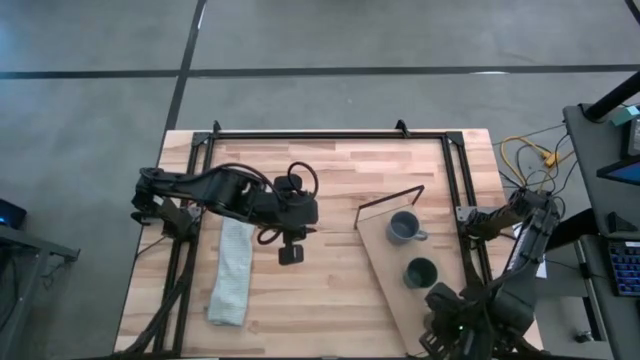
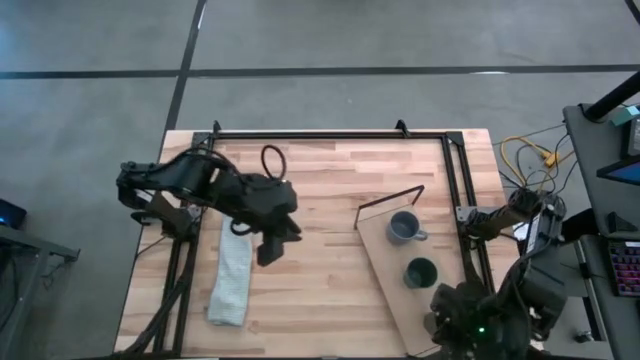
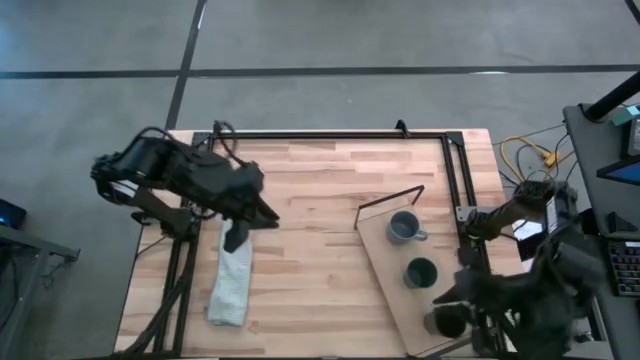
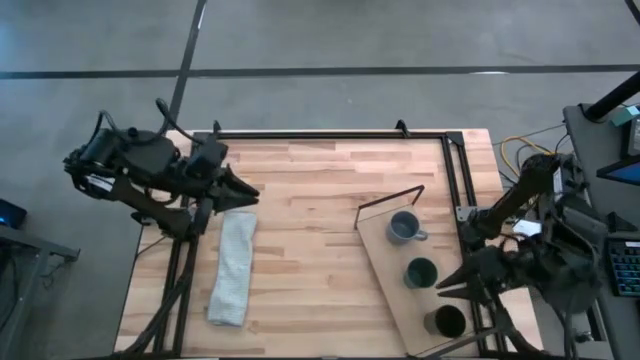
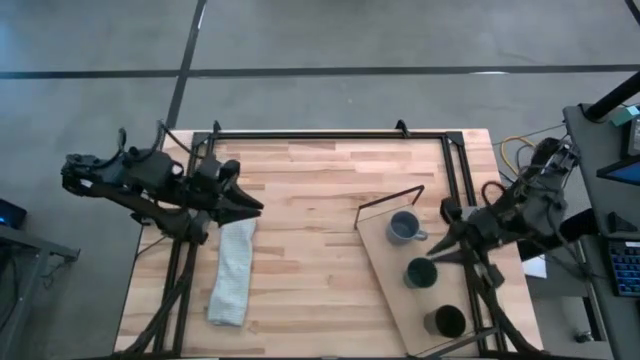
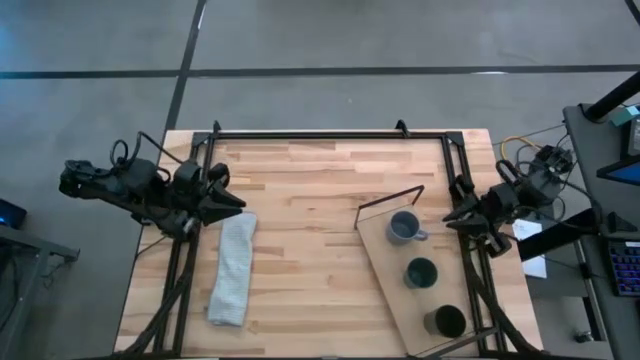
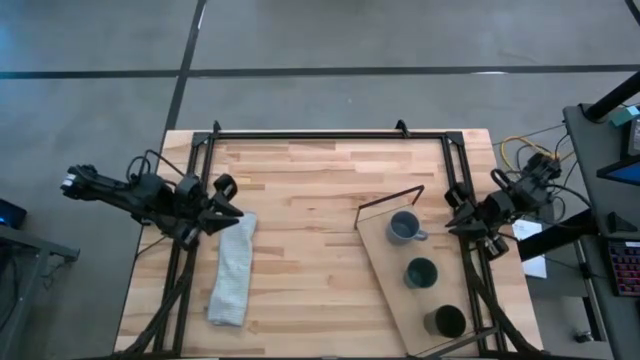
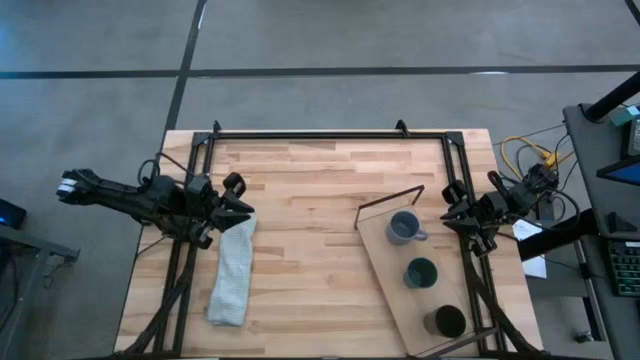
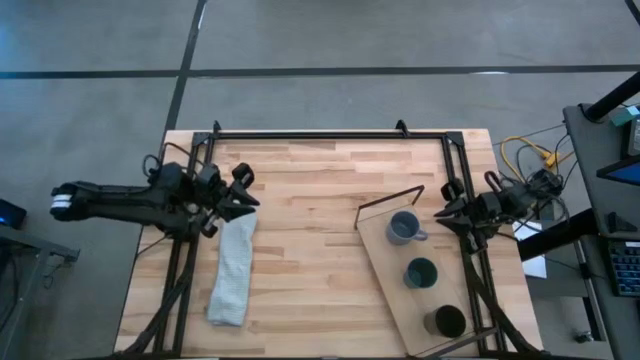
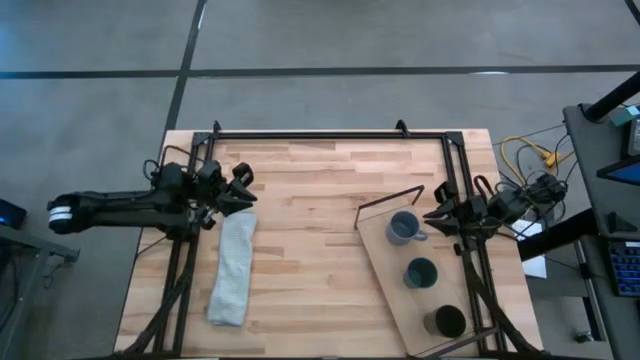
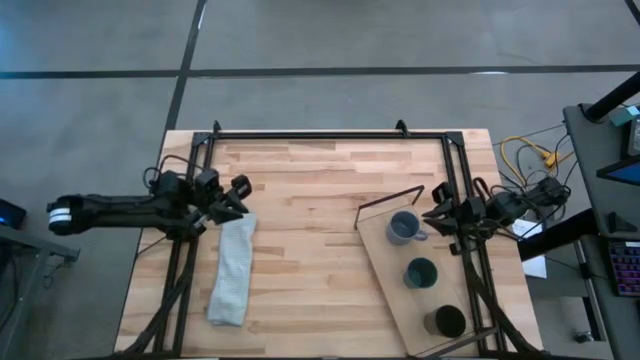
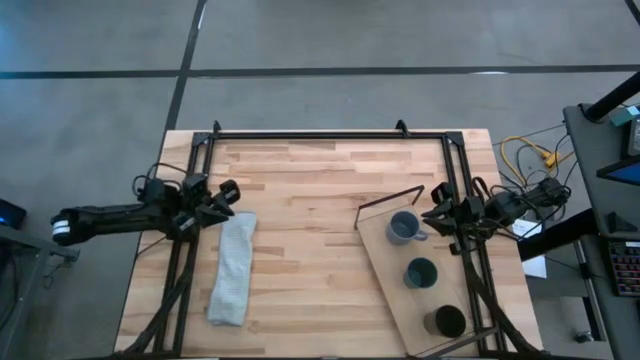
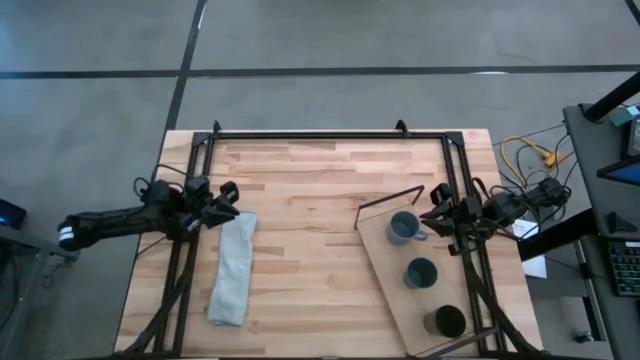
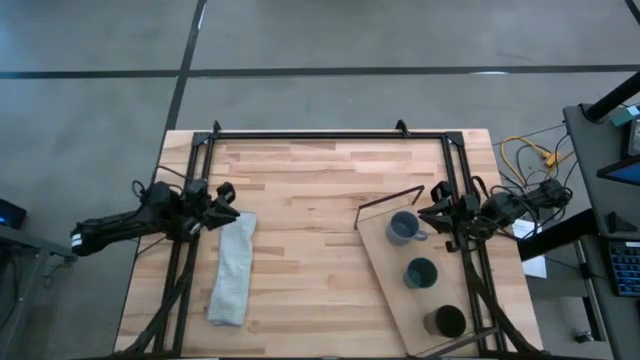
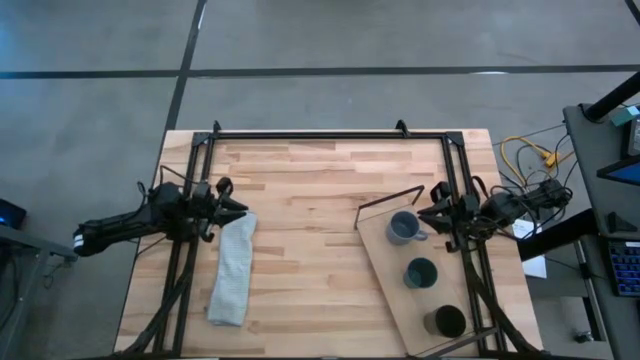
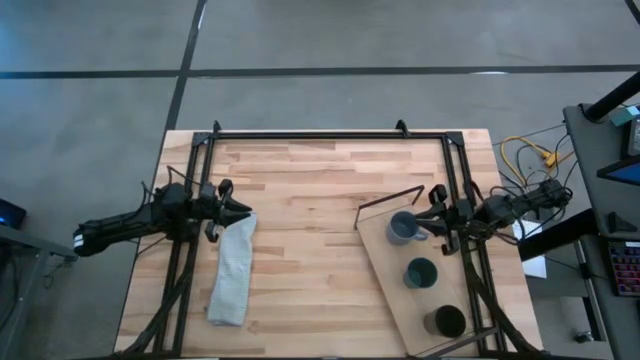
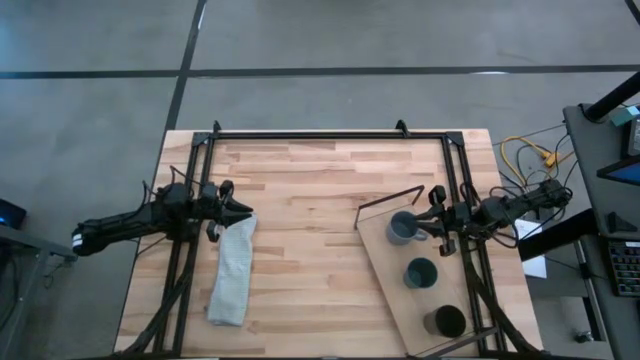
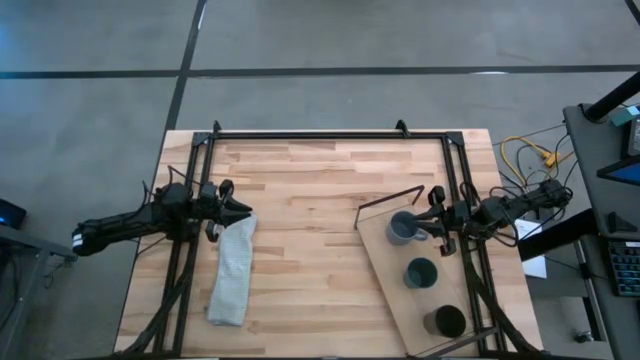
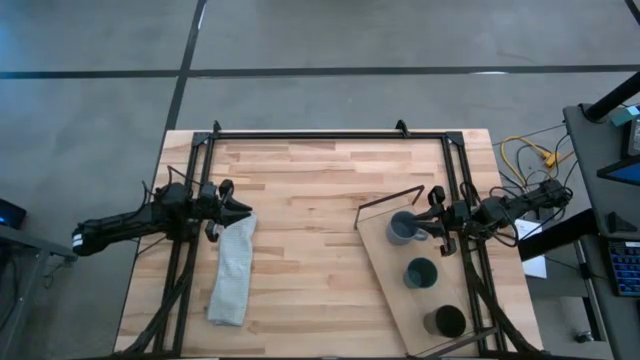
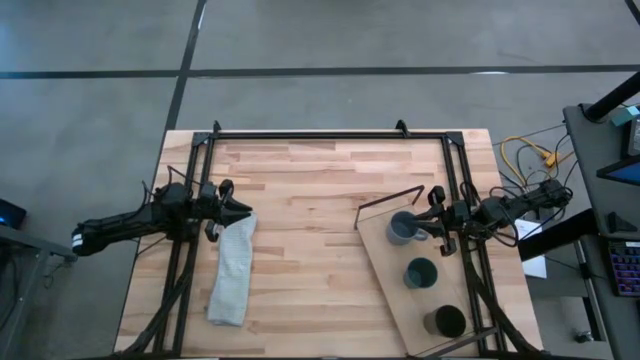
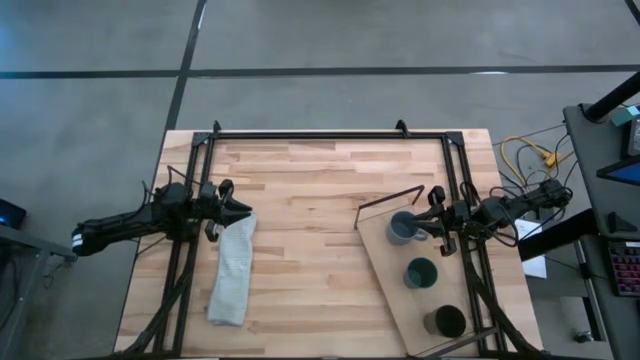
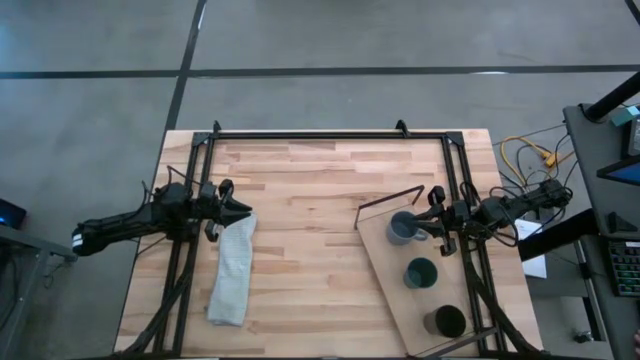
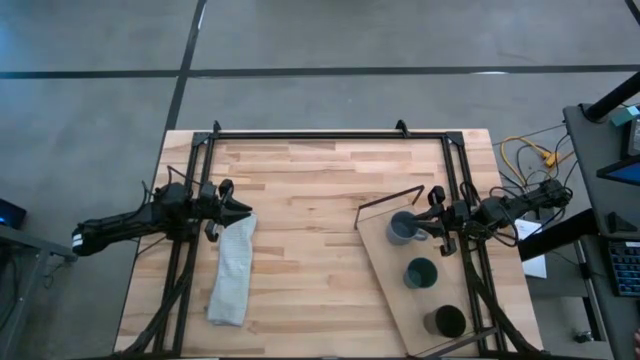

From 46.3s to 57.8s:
Task: Stack small to large cups/mugs on shelf
Return to Home Position

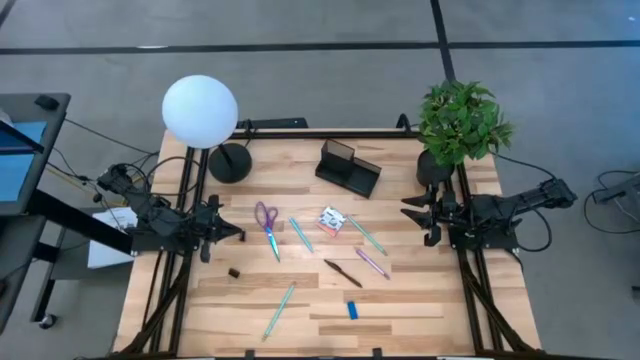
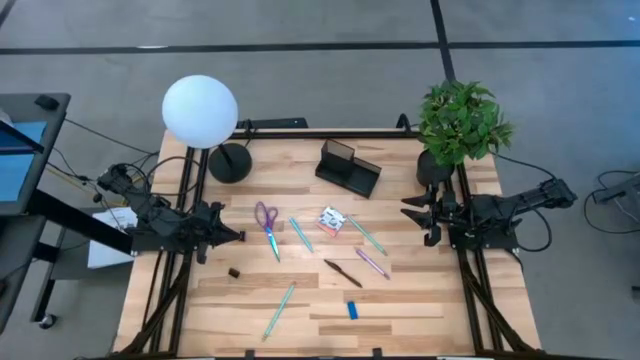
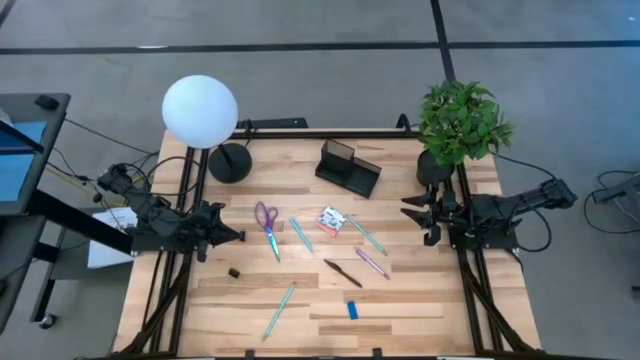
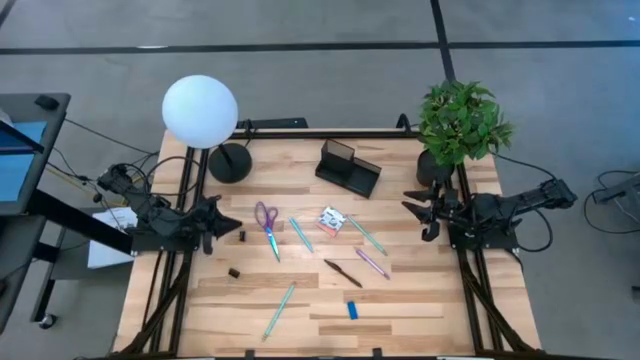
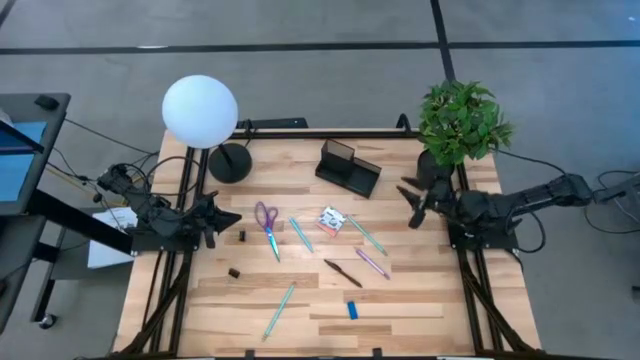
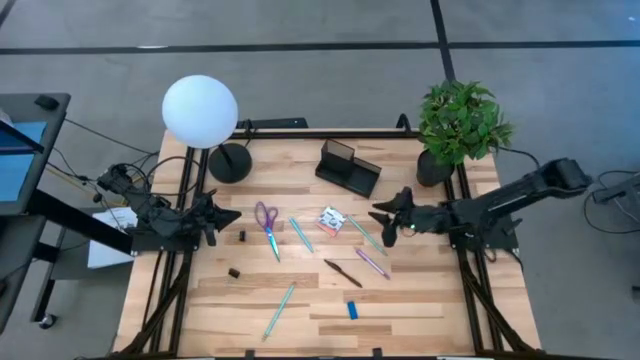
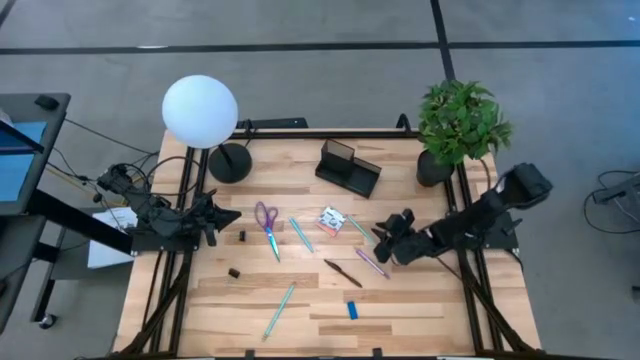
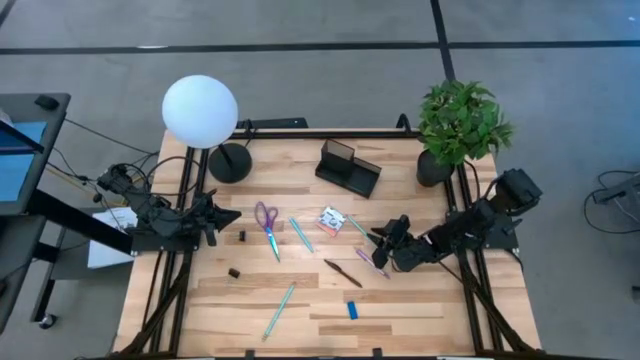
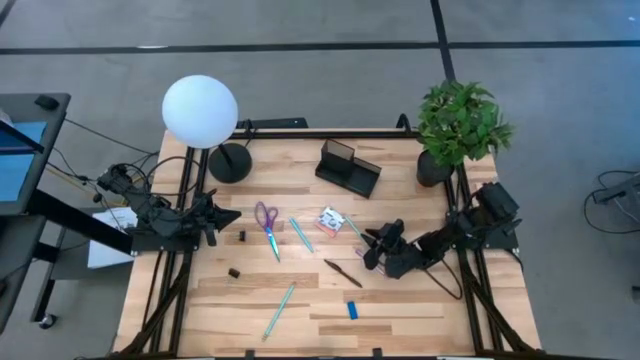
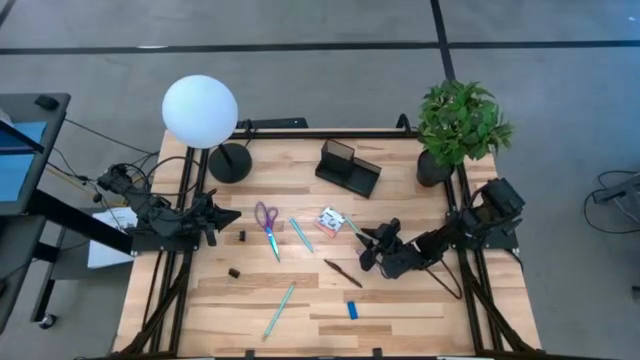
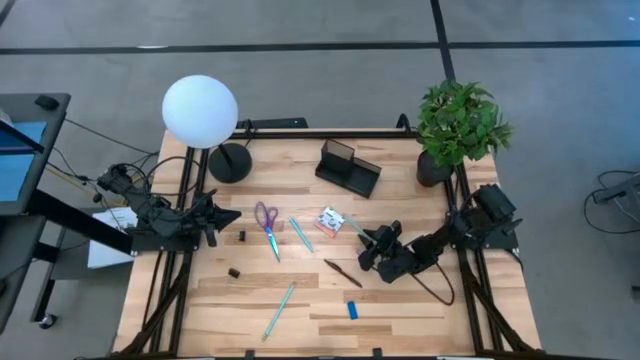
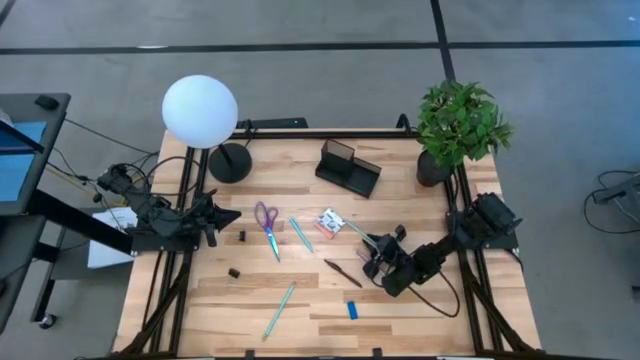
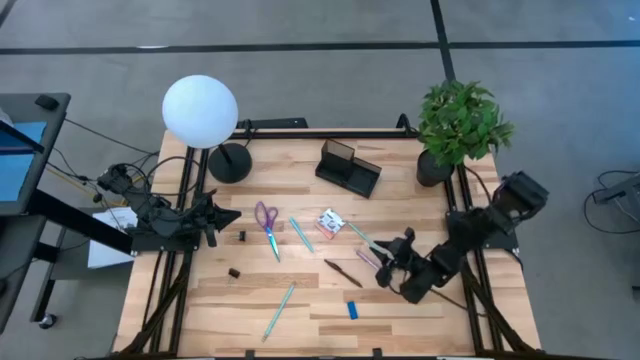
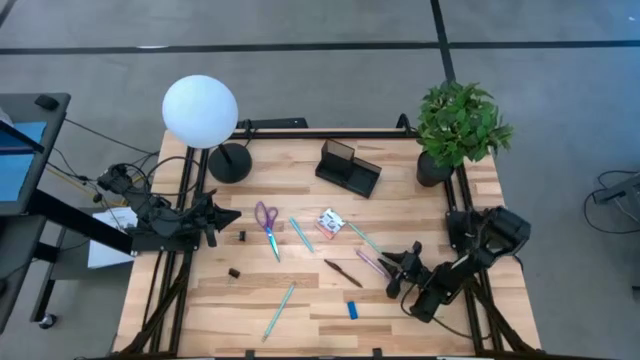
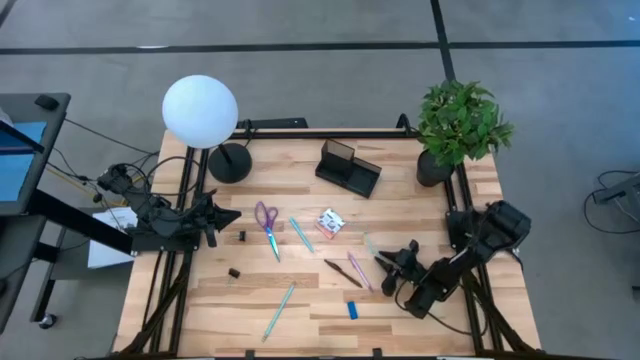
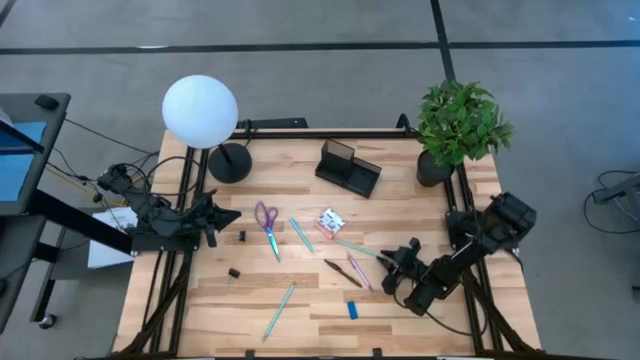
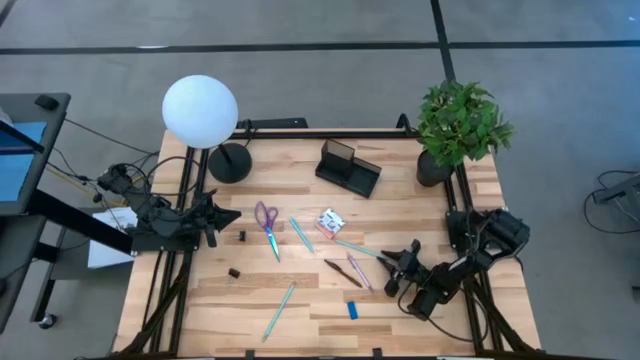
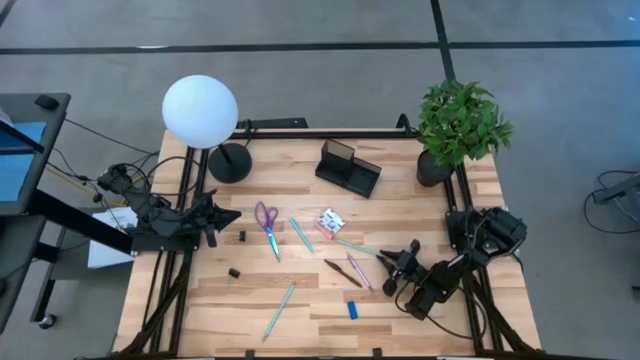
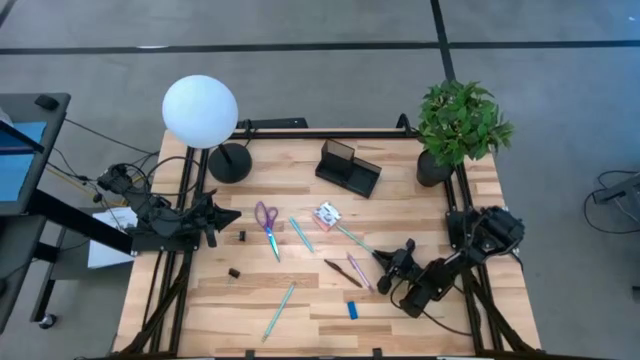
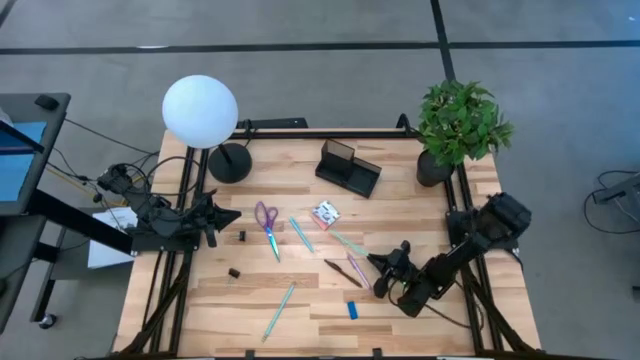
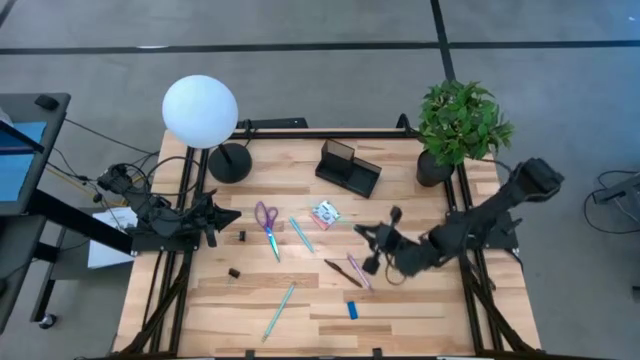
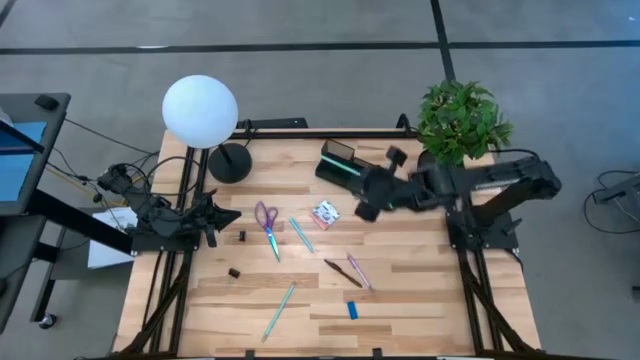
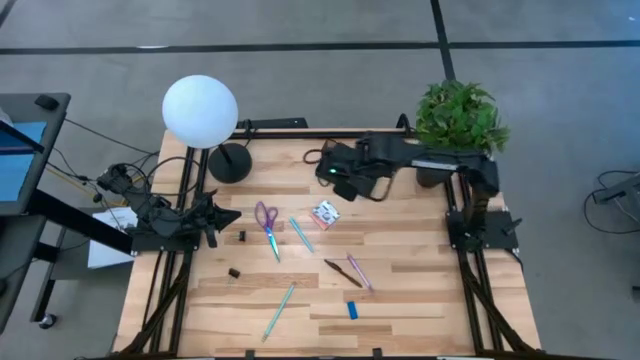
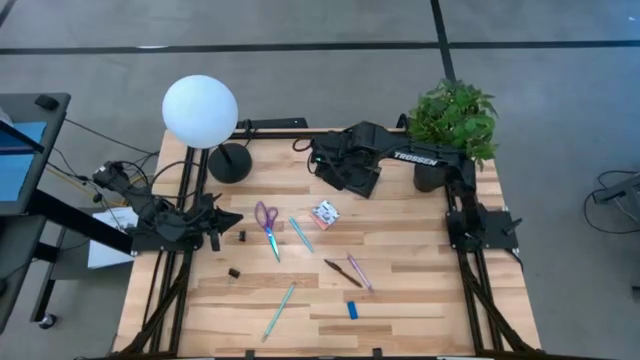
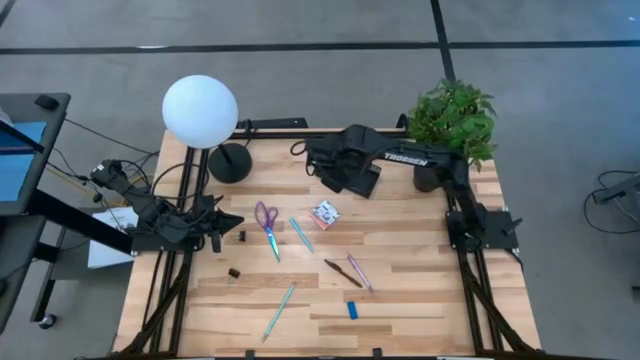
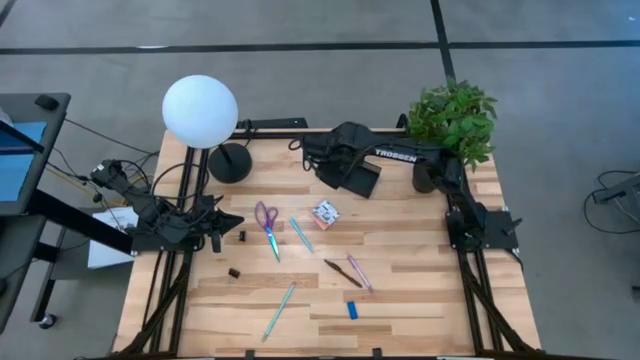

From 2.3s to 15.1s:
Task: Pick and place office supplies into organizer
Put the light blue pencil into the black desk organizer
